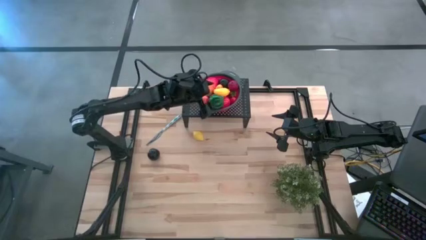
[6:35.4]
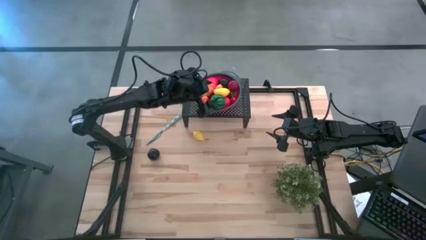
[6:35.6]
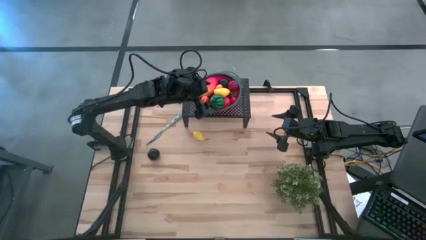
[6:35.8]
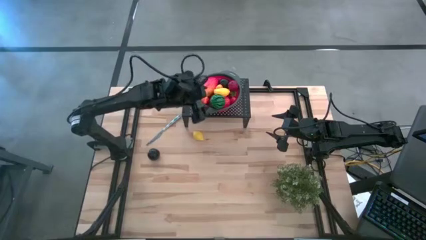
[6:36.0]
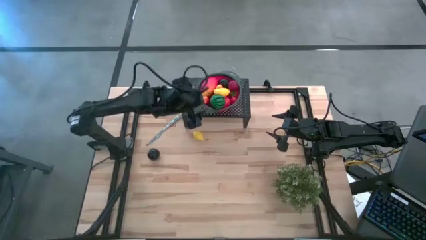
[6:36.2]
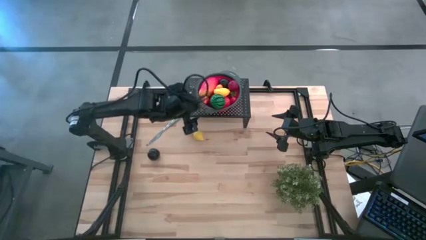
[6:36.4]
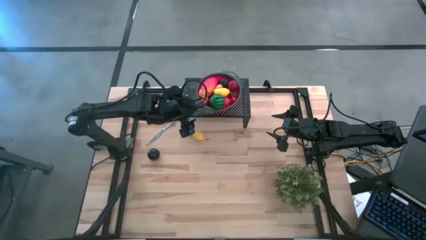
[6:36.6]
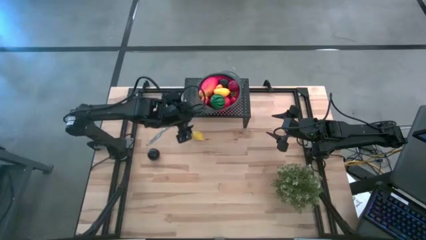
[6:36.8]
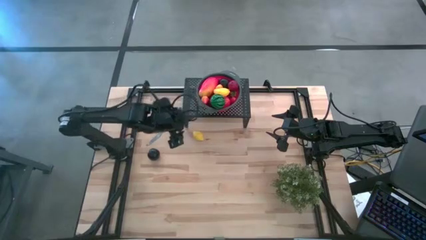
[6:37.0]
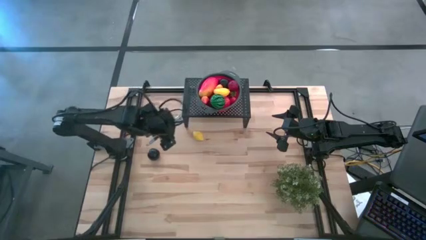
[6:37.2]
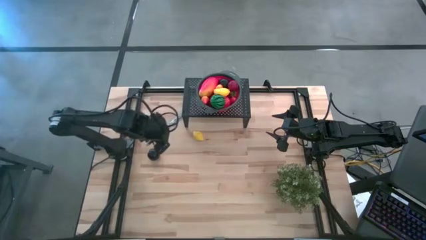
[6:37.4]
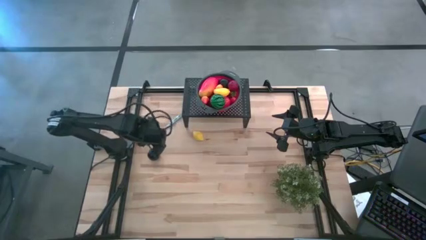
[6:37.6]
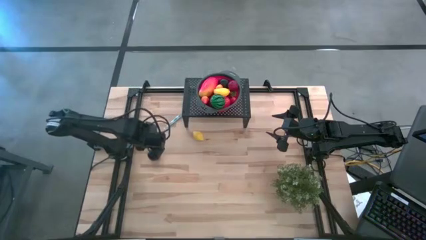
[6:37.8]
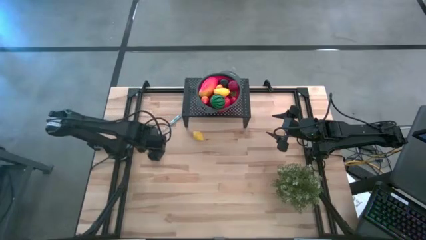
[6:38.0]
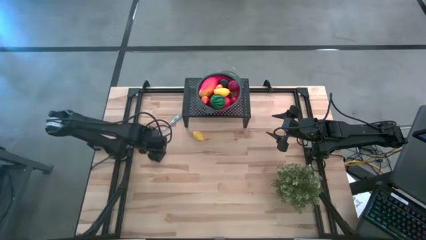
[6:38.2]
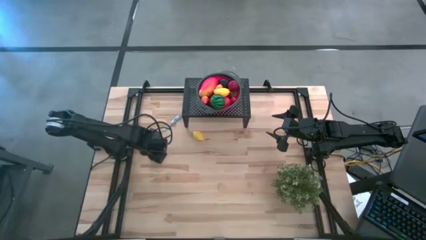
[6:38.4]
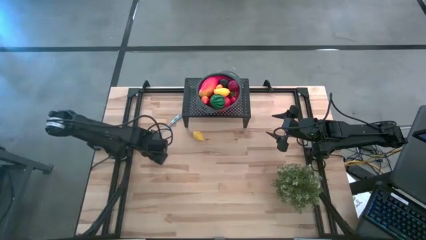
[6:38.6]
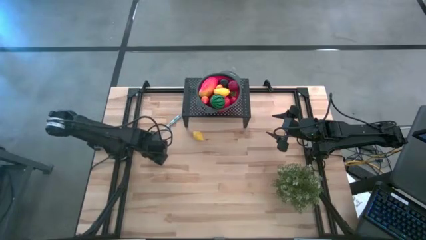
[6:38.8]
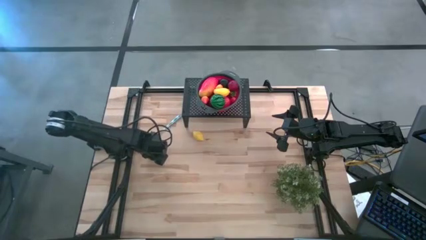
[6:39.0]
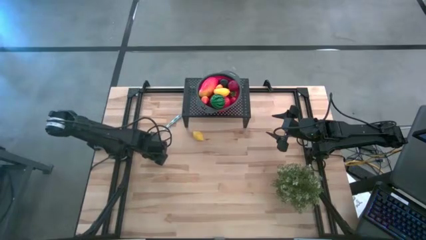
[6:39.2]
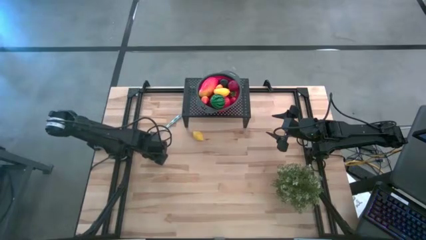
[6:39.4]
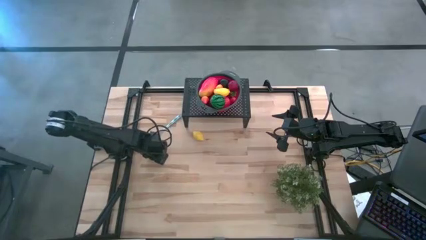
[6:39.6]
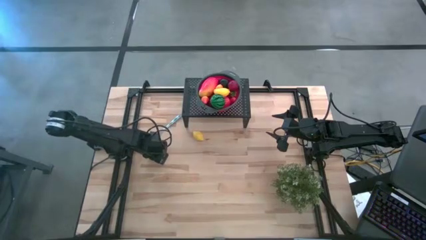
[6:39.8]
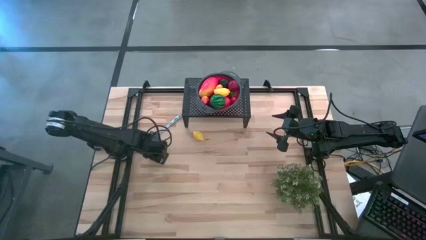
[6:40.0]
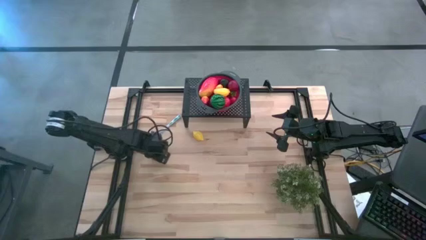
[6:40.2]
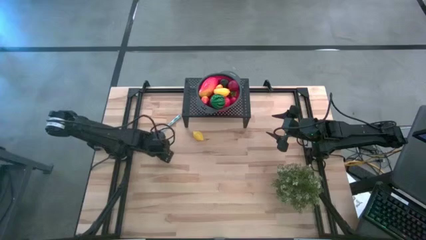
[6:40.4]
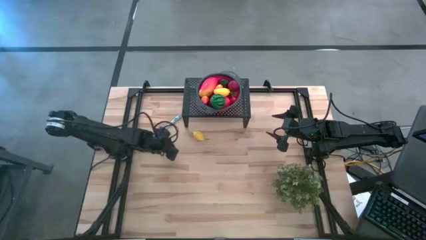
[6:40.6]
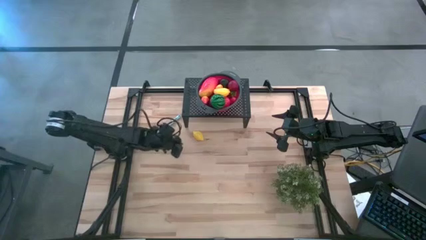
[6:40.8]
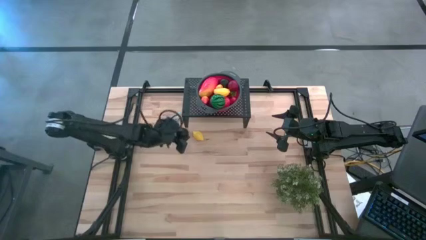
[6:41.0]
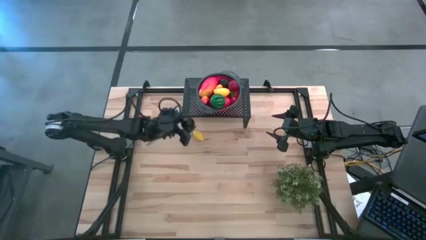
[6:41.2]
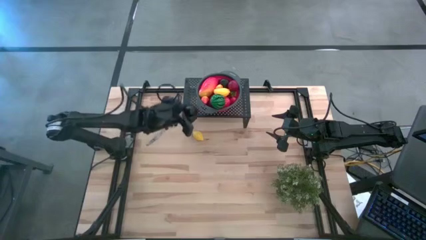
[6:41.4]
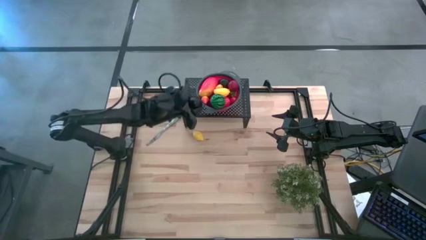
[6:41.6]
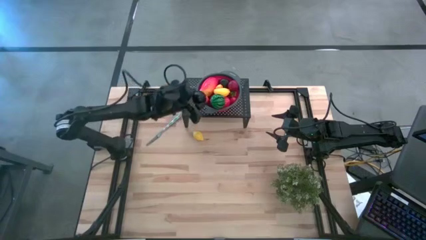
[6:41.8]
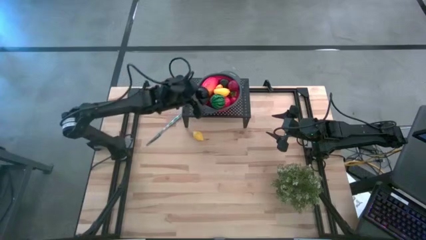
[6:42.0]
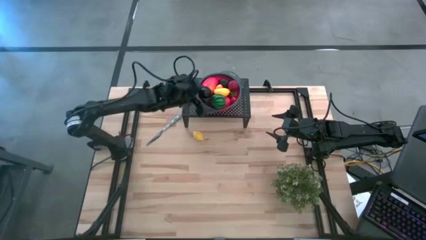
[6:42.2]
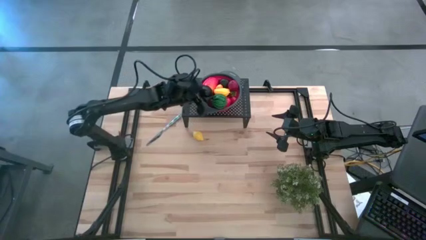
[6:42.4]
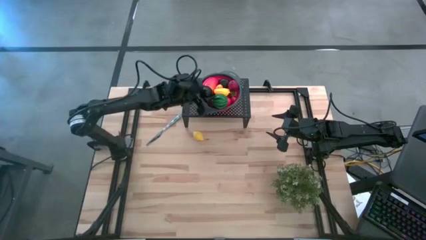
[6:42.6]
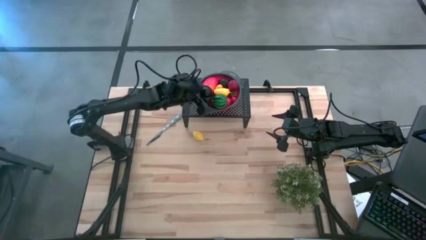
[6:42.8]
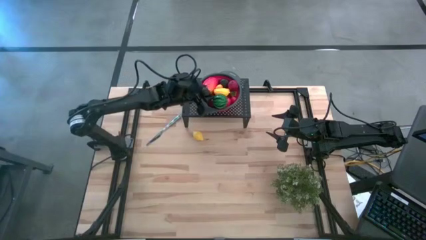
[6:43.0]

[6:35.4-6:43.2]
Task: Pick & Place Fruit
Put the plum in the red colander on the shelf

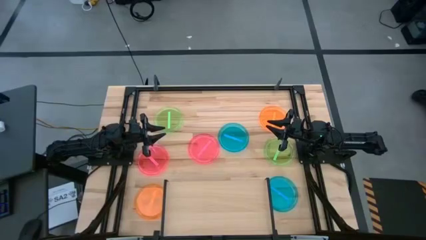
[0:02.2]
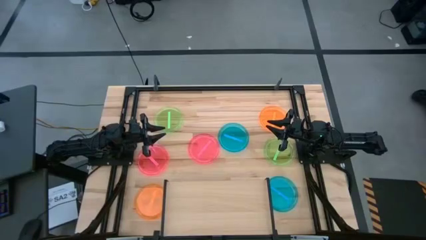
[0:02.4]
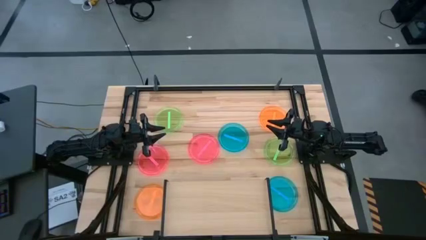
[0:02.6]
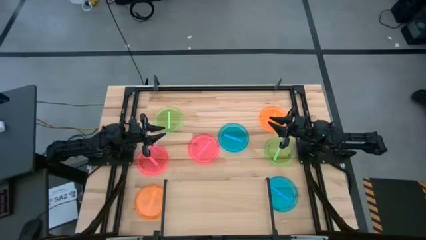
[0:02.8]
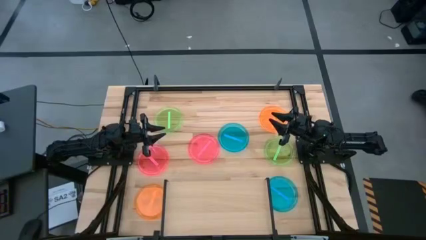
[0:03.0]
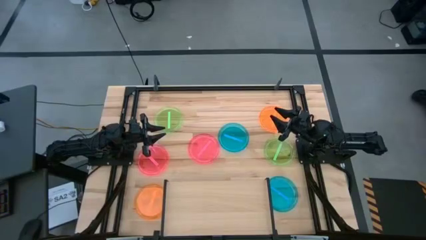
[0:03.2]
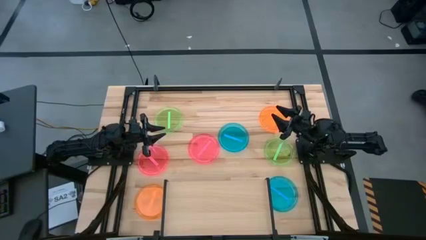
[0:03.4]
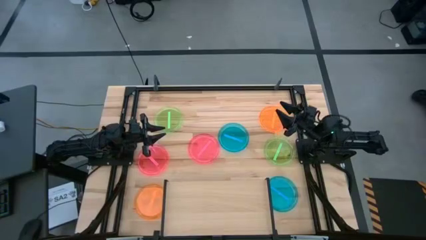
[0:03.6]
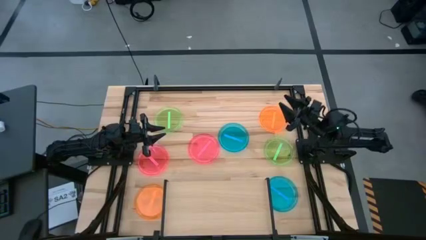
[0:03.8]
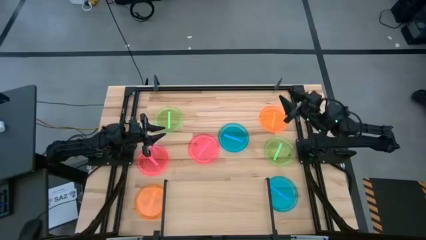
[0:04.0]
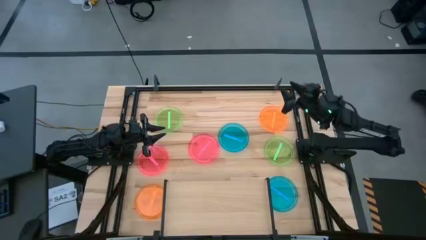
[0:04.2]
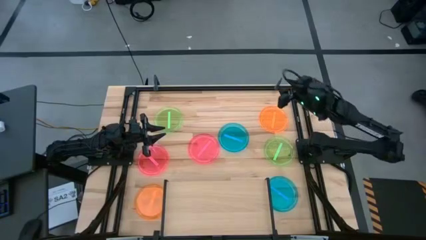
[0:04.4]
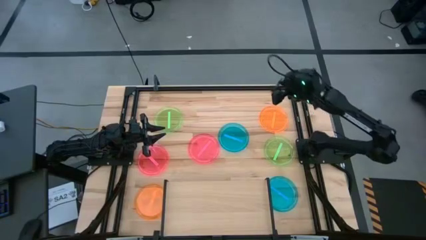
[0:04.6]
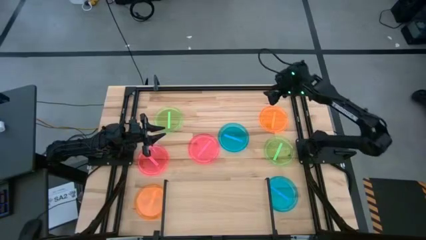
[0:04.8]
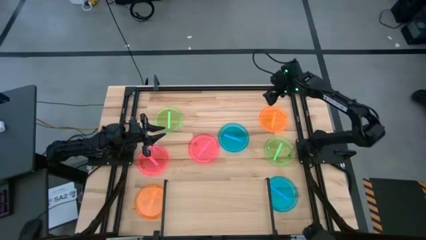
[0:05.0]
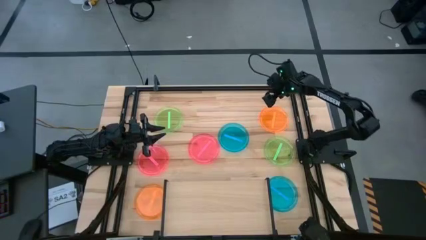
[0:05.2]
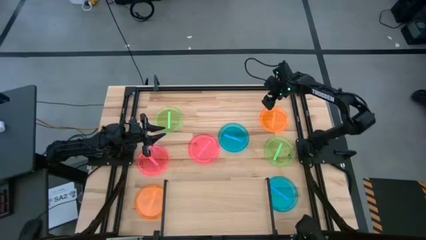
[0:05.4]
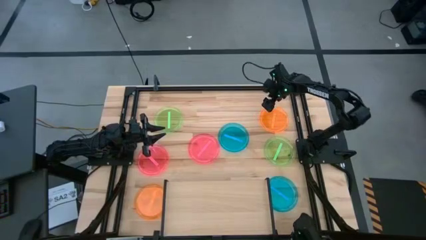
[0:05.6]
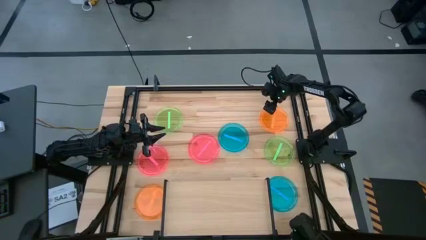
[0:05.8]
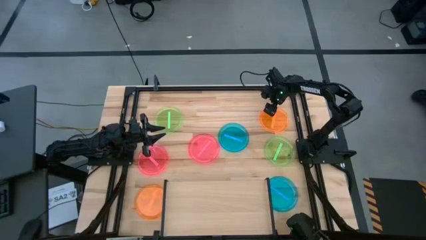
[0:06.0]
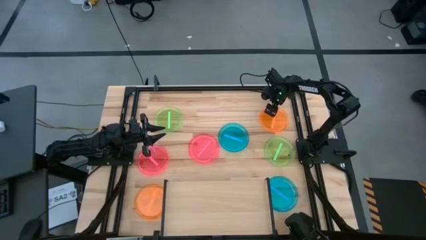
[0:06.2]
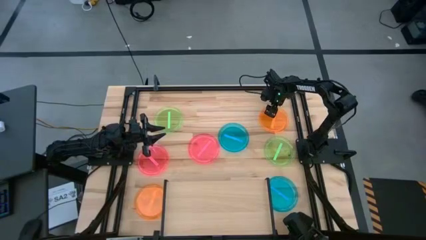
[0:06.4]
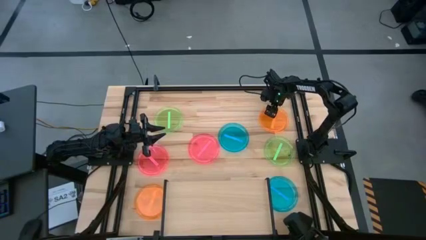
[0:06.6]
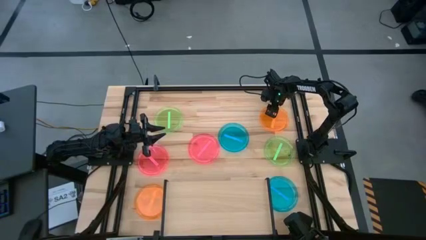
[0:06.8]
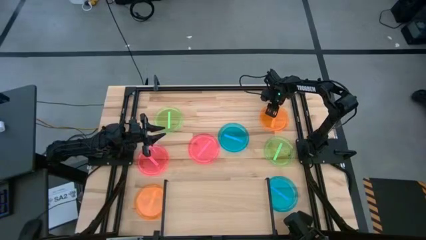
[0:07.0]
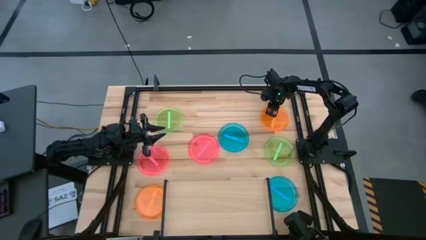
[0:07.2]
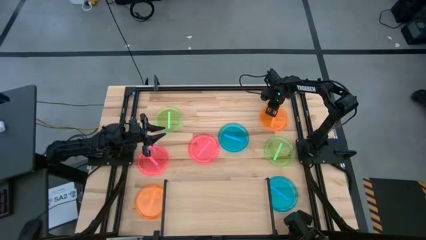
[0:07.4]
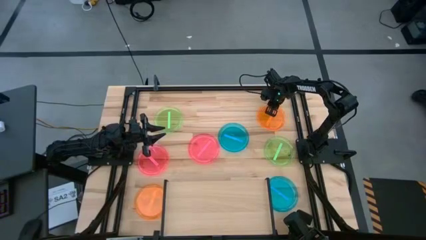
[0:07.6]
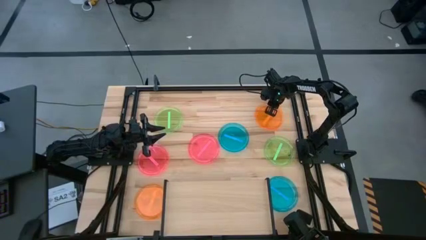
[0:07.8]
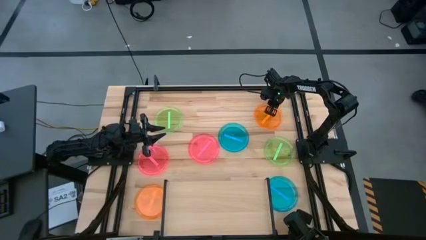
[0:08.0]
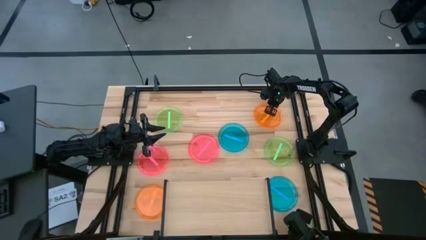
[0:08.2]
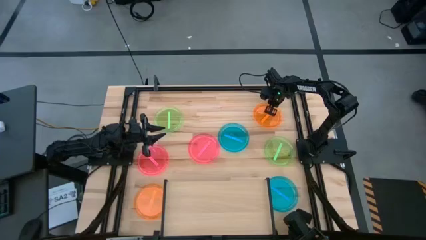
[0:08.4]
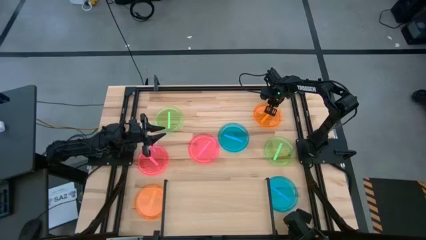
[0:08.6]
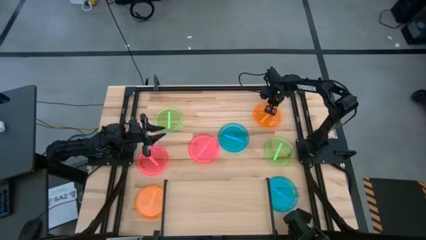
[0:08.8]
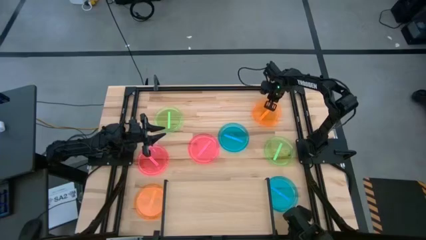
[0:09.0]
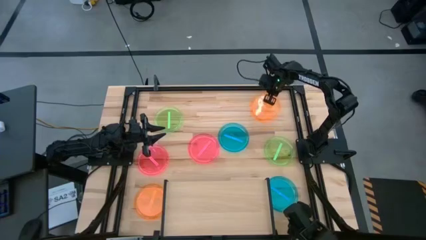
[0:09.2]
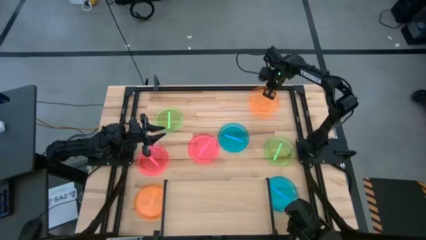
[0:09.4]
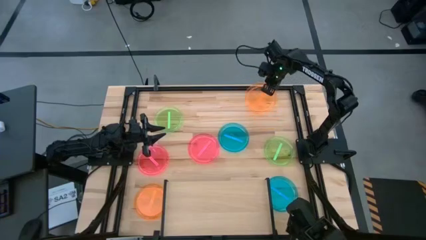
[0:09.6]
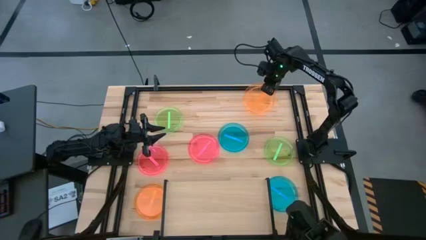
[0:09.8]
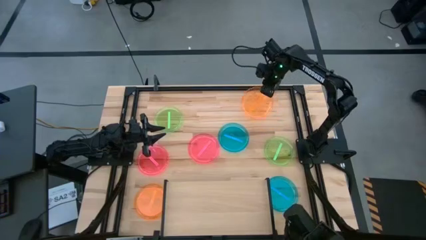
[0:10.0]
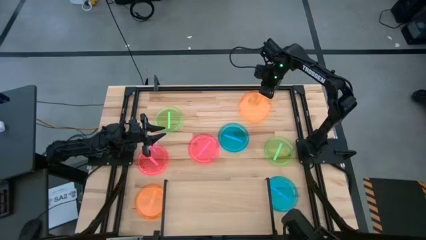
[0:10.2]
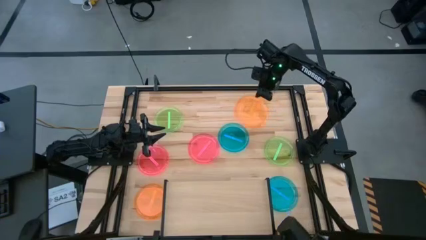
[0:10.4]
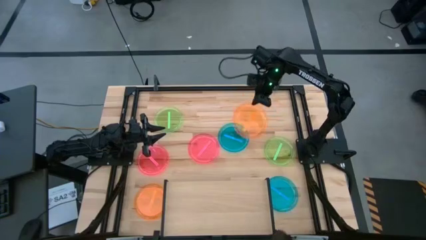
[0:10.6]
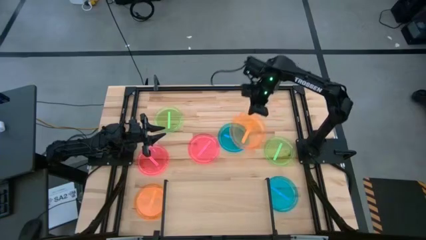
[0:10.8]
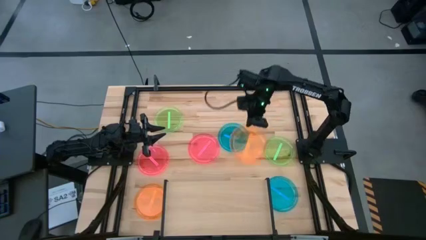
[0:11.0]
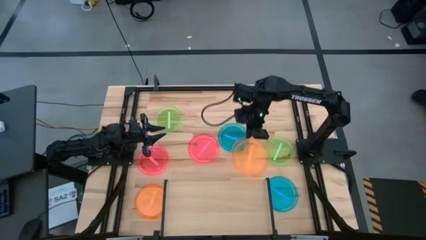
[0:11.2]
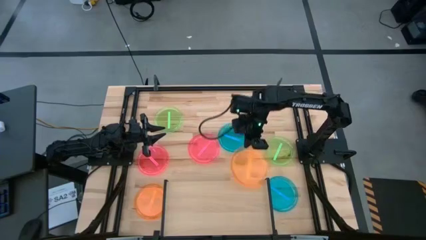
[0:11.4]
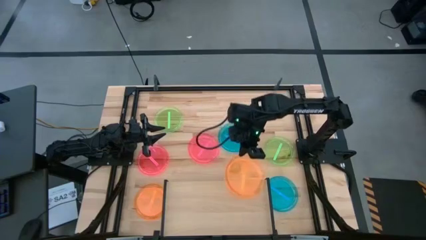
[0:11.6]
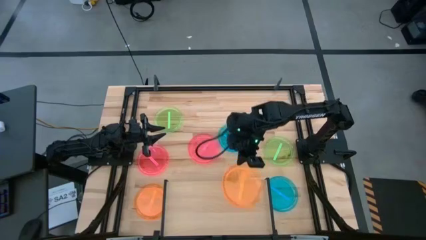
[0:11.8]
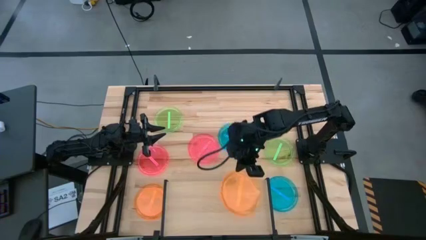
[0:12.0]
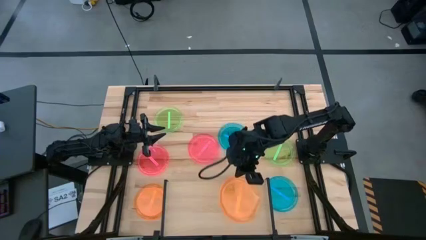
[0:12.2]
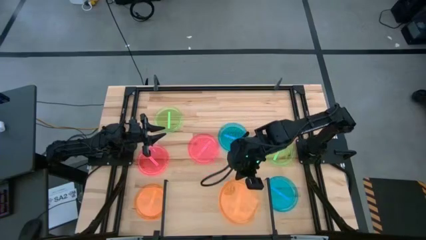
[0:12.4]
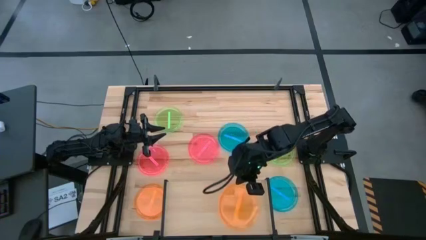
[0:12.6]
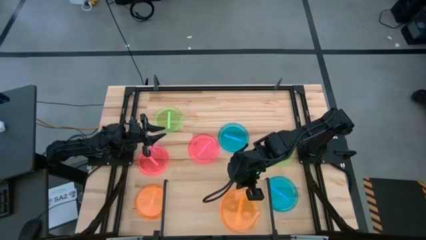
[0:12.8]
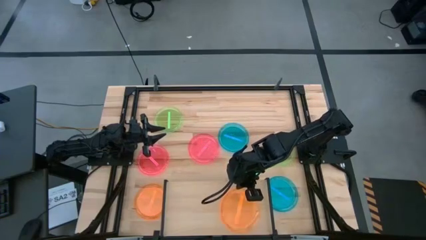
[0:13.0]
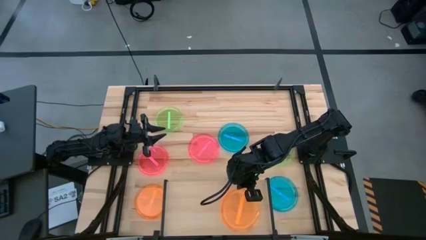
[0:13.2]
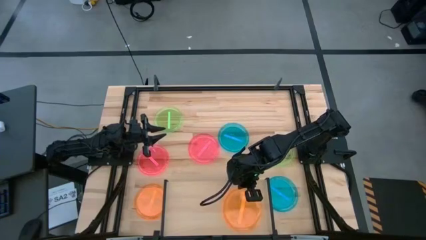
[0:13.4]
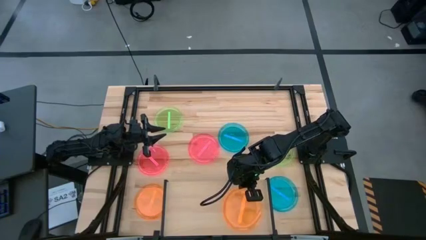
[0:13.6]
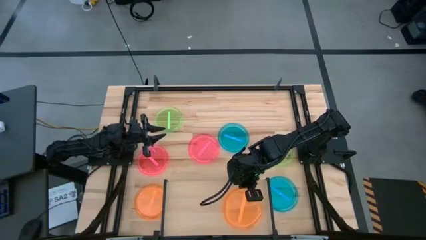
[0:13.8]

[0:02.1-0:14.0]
Task: Place and stack plates onto a shelf
Put the top orange plate on the shelf
